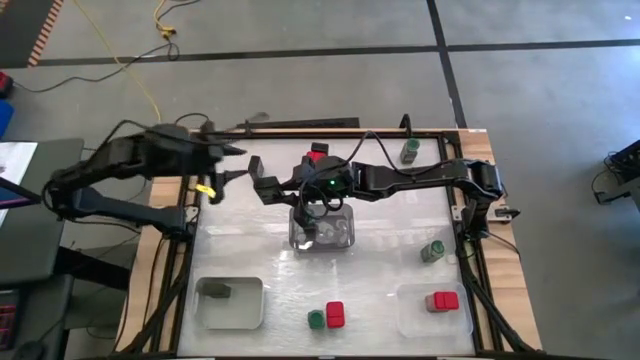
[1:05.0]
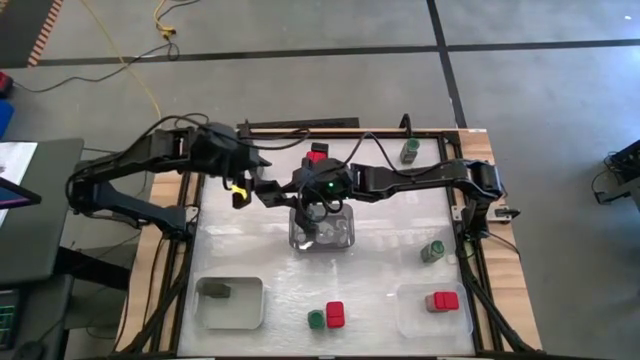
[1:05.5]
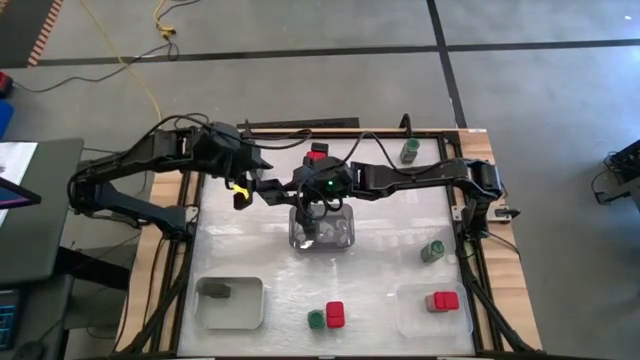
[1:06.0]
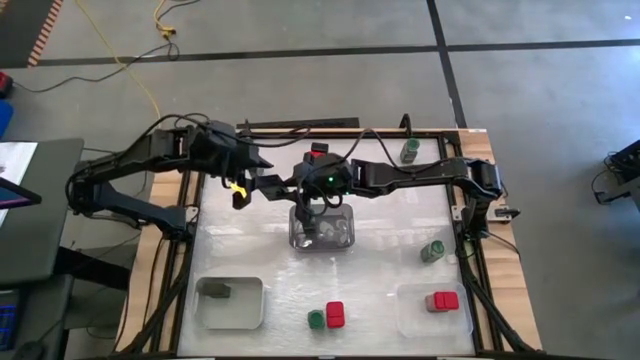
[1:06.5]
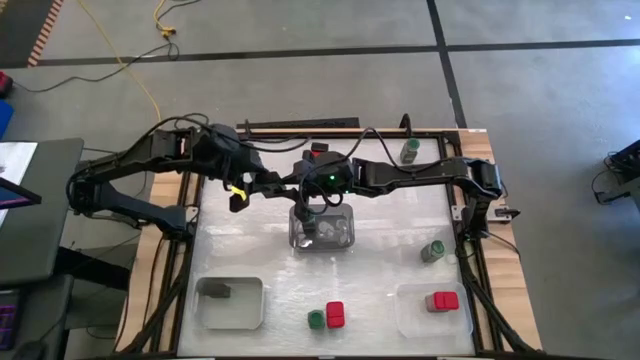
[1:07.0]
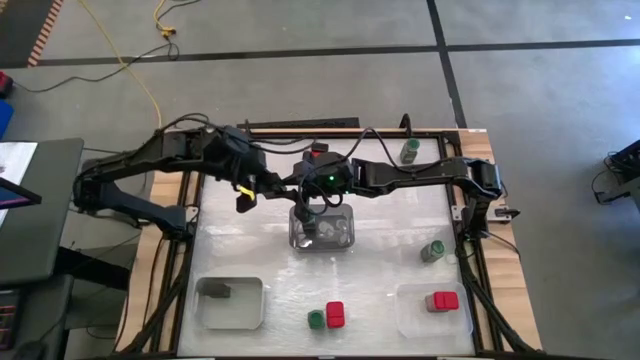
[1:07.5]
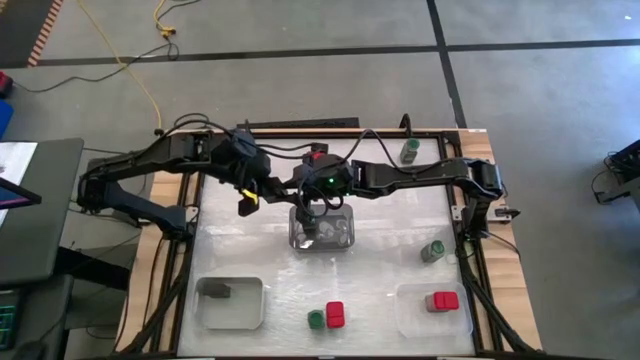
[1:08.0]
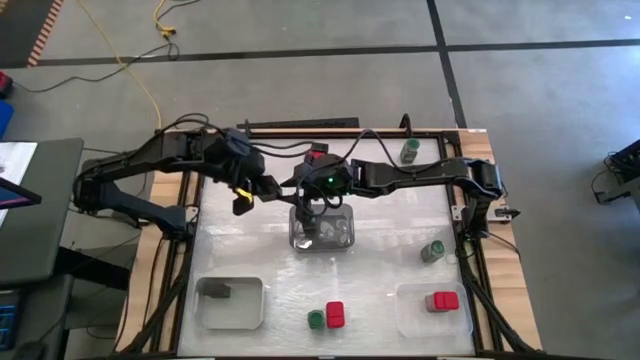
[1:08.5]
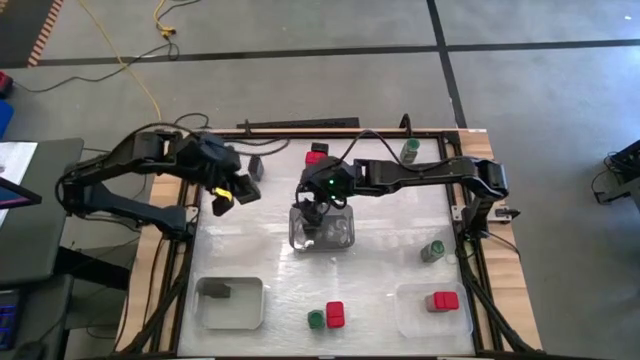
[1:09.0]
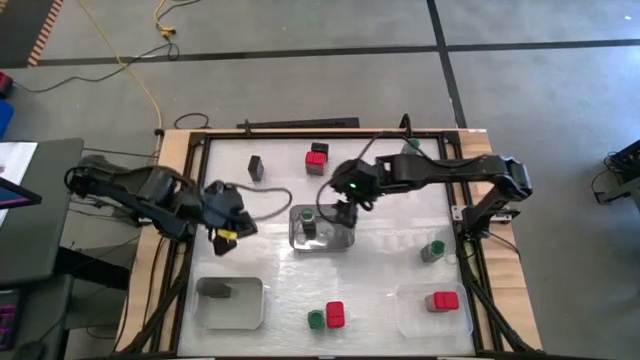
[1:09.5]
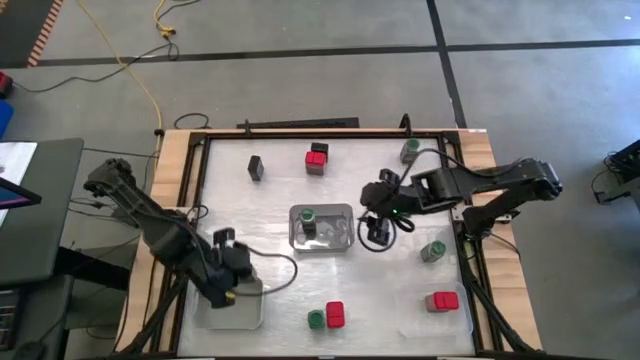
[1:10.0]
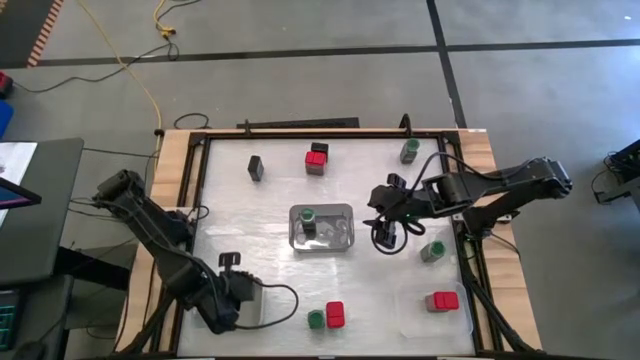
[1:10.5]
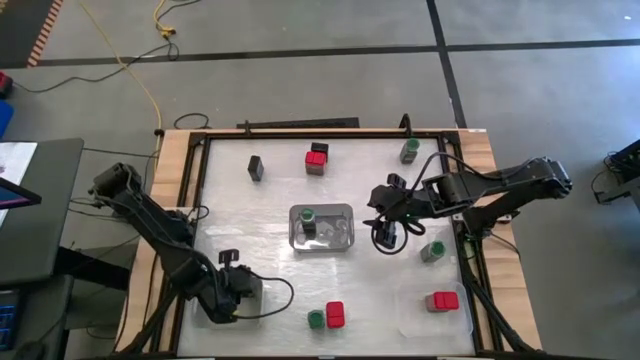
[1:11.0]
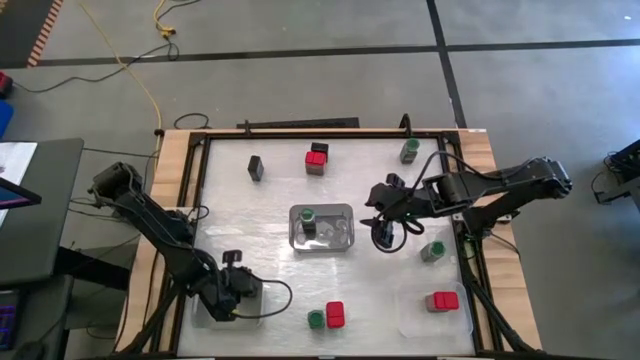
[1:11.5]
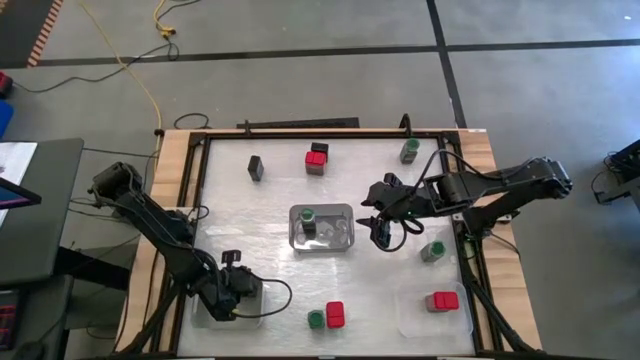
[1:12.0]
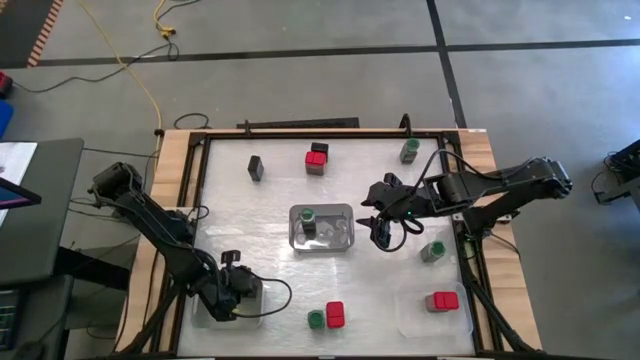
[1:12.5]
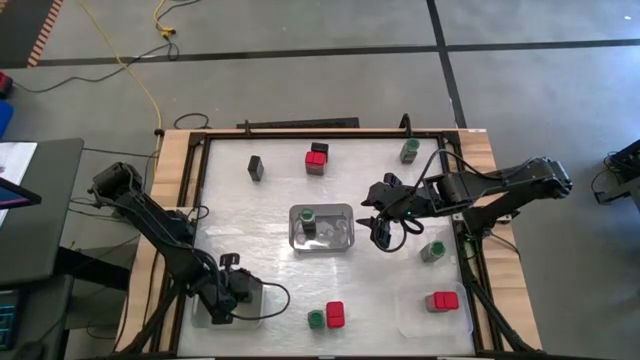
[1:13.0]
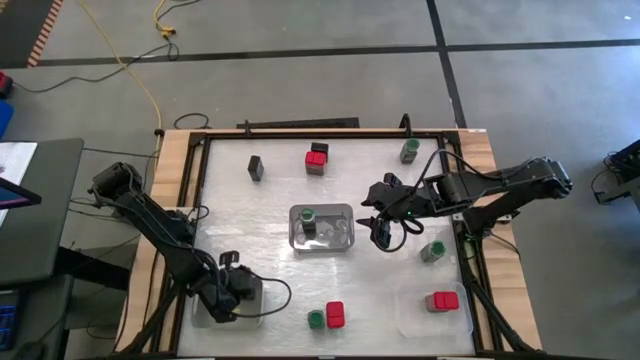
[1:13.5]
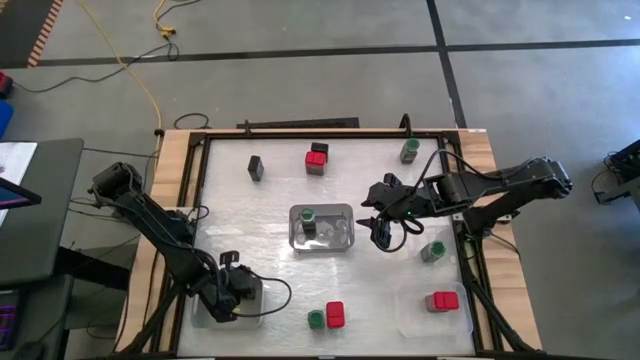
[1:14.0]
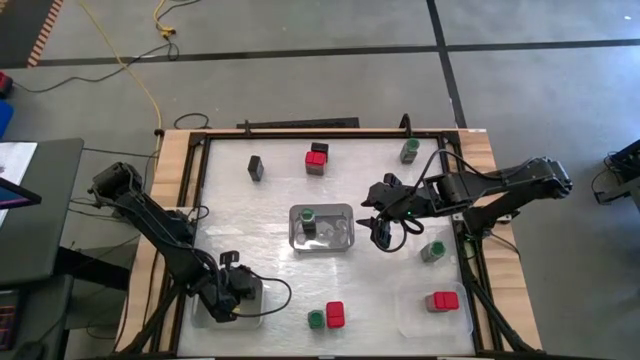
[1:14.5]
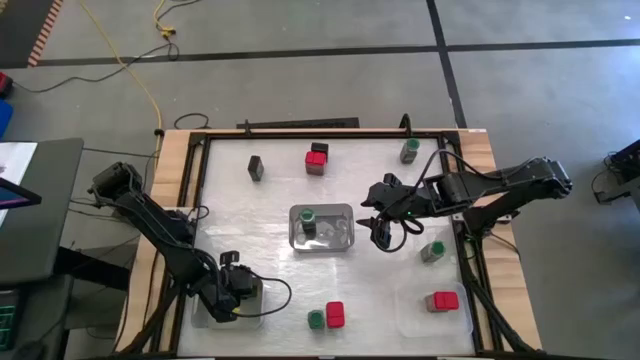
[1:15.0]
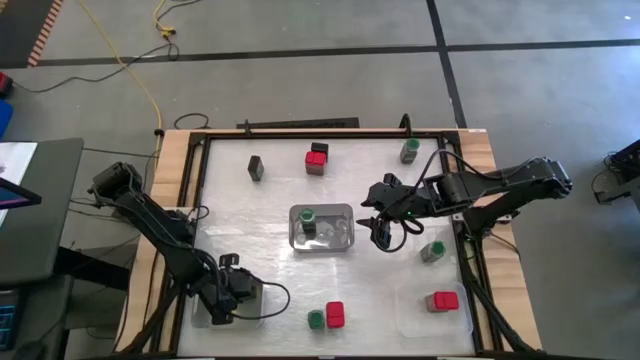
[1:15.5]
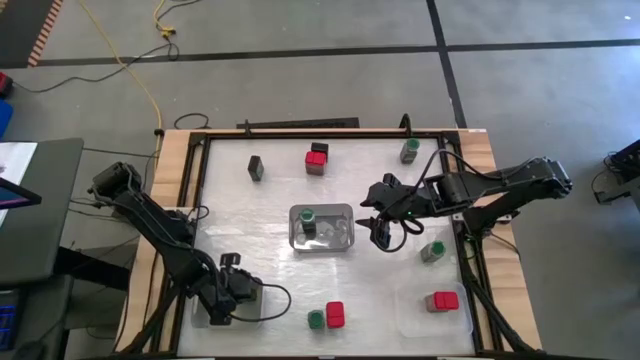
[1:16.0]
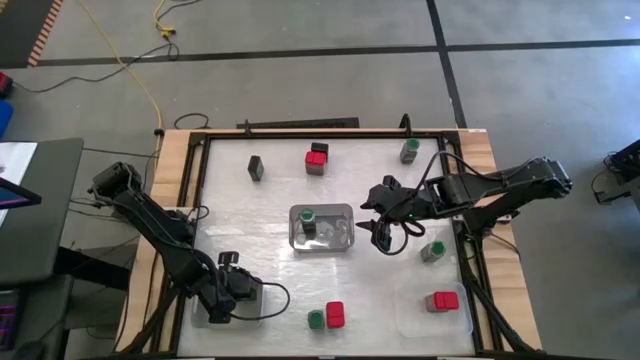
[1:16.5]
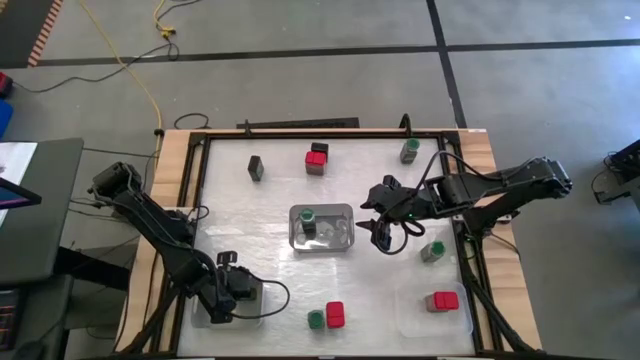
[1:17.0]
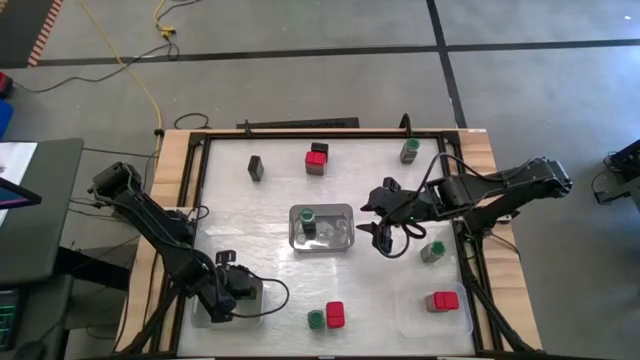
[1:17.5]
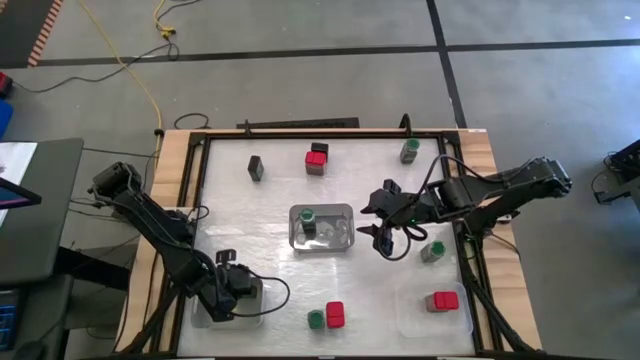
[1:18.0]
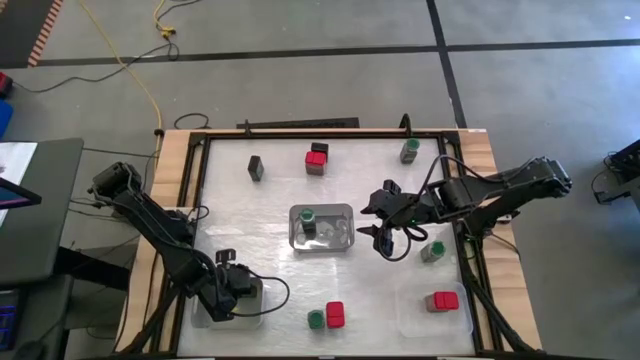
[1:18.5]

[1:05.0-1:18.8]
Task: Sort spices by type
Put the right black seasoning can into the grey bin

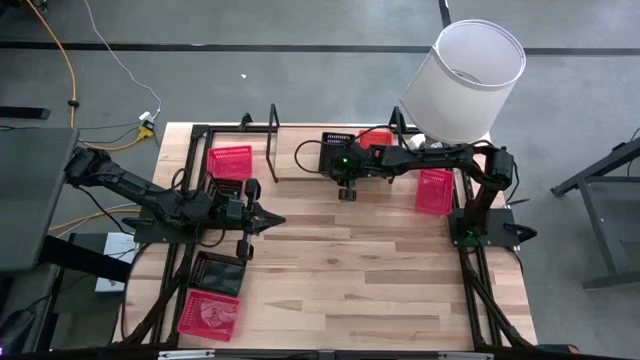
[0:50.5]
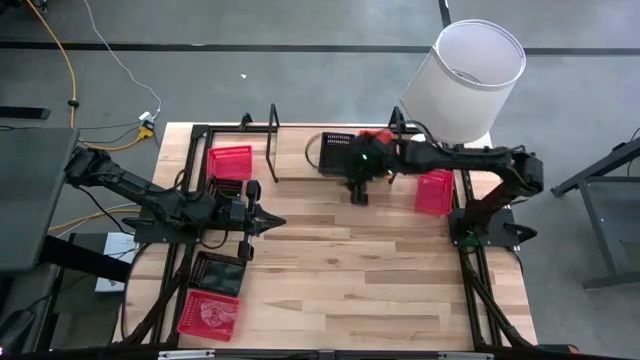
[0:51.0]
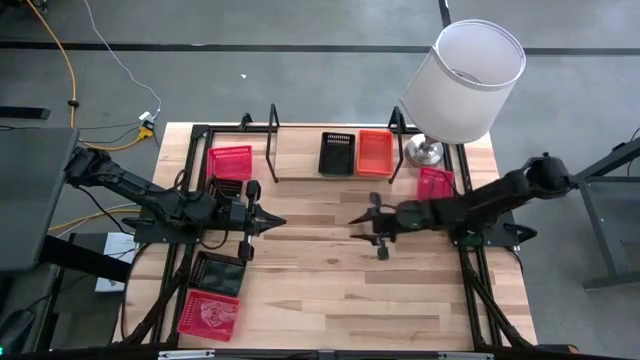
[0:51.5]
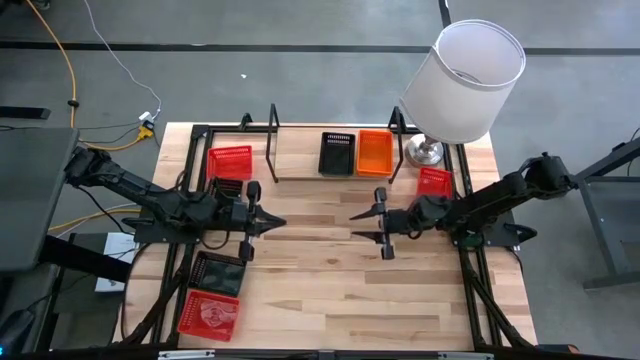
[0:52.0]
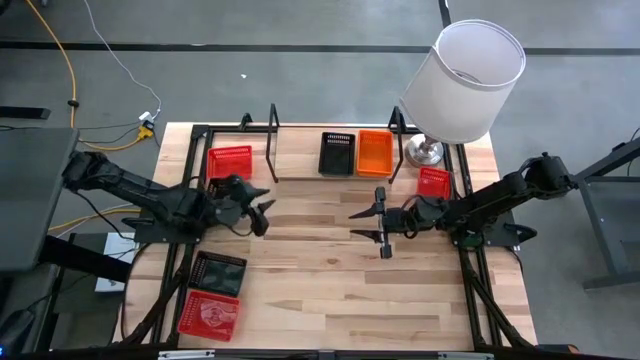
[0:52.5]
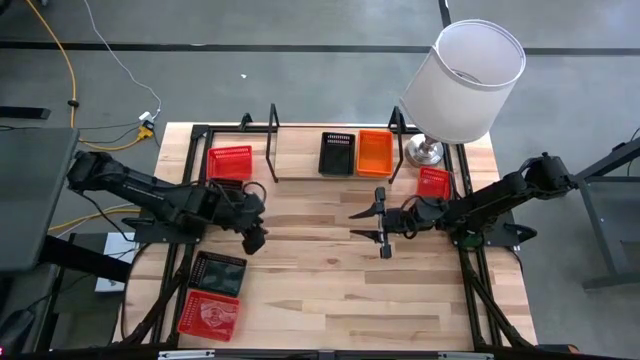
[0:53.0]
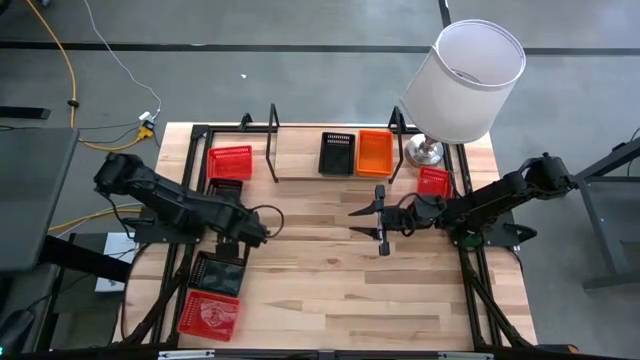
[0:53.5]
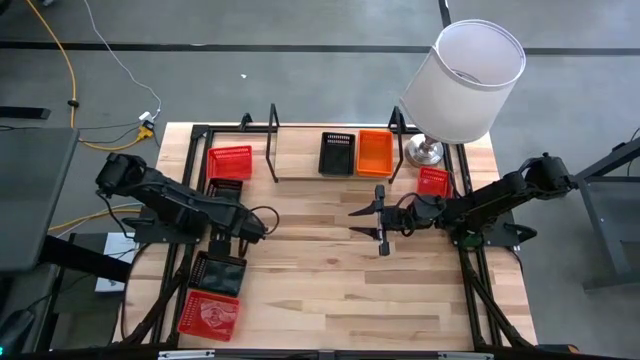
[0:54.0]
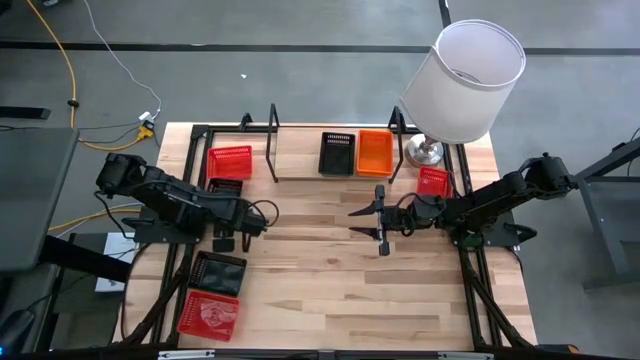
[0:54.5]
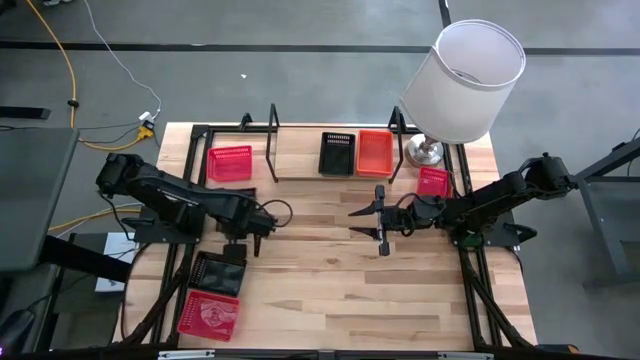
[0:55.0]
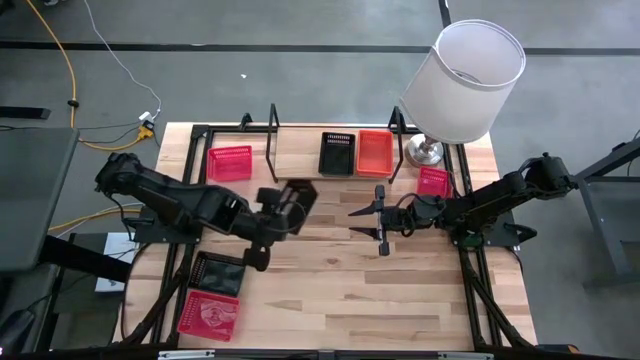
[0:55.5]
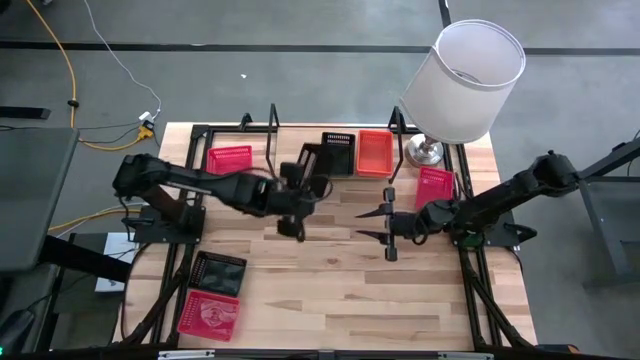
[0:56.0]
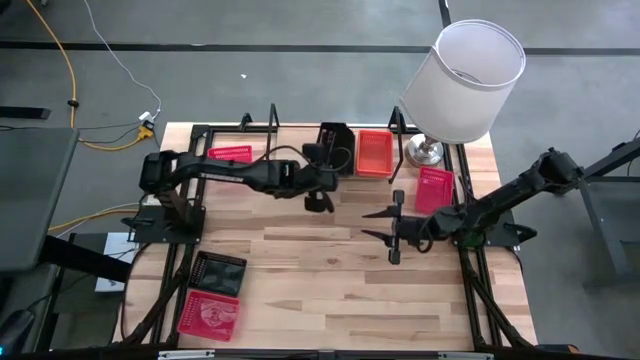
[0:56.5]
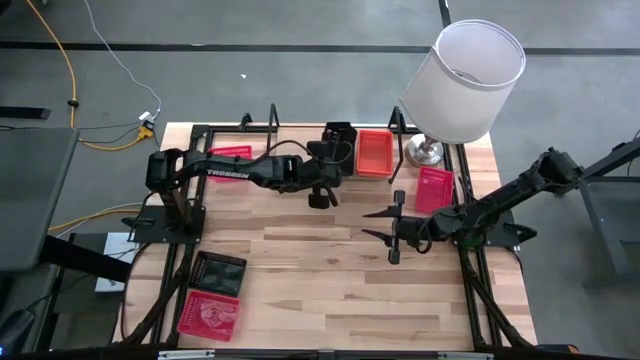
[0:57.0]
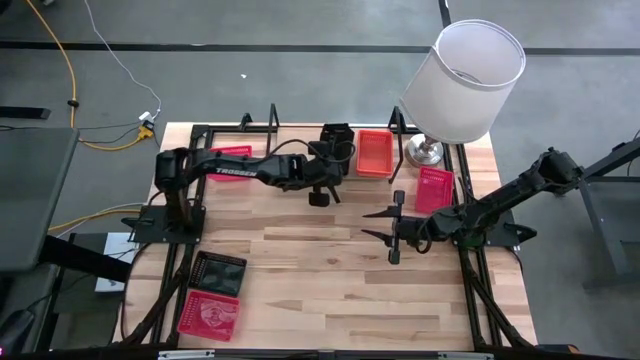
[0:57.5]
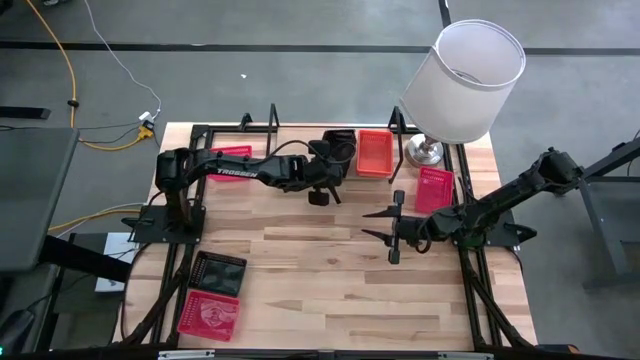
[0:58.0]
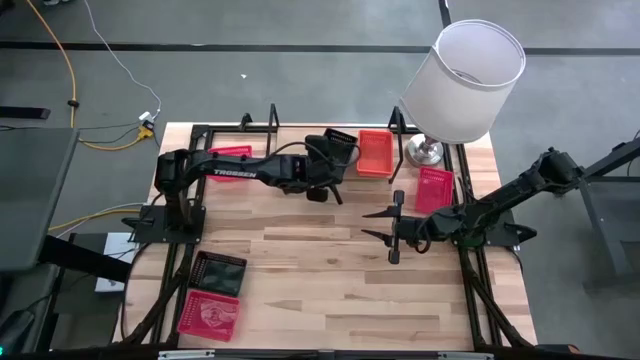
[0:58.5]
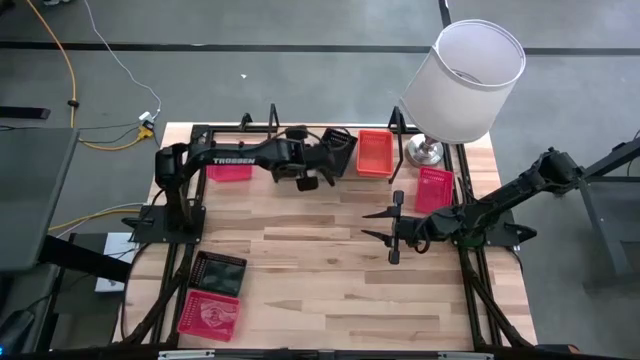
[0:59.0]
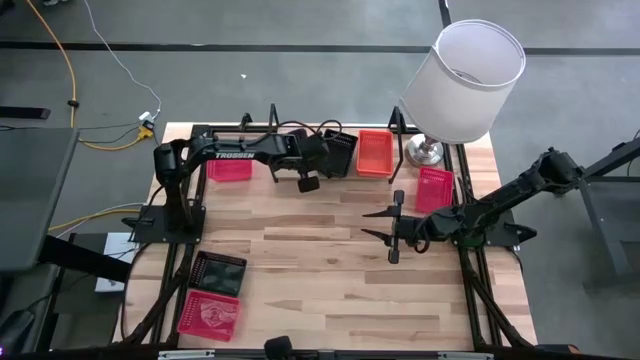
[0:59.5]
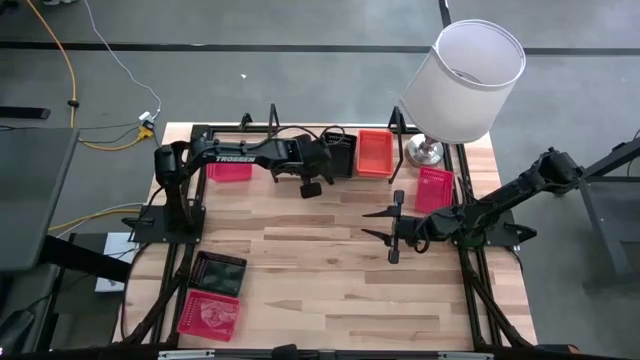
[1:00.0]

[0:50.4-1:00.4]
Task: Stack baskets on shelf by color
Stack the top black basket on top of the black basket on the shelf
